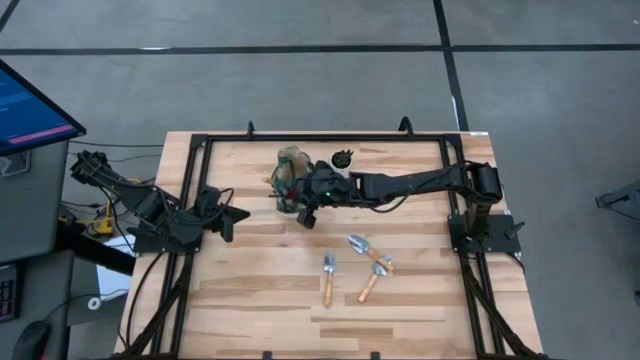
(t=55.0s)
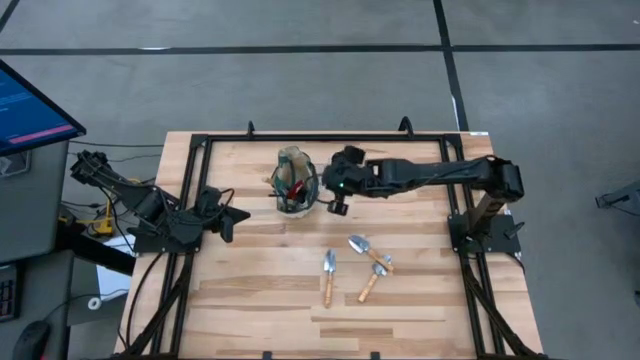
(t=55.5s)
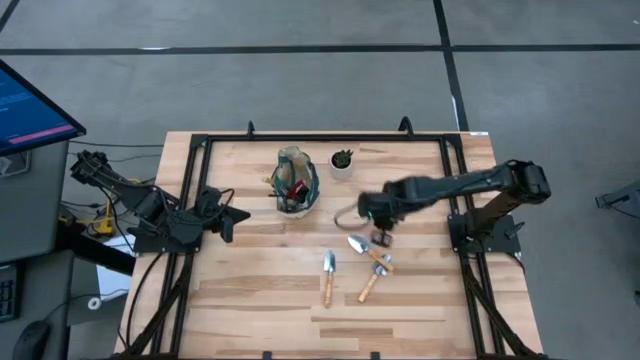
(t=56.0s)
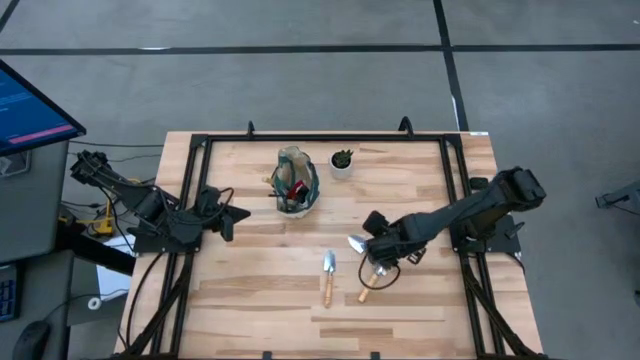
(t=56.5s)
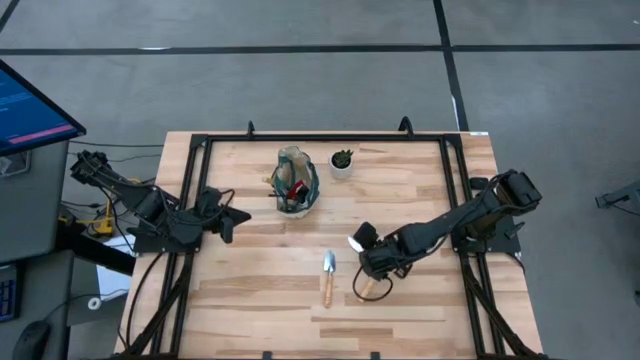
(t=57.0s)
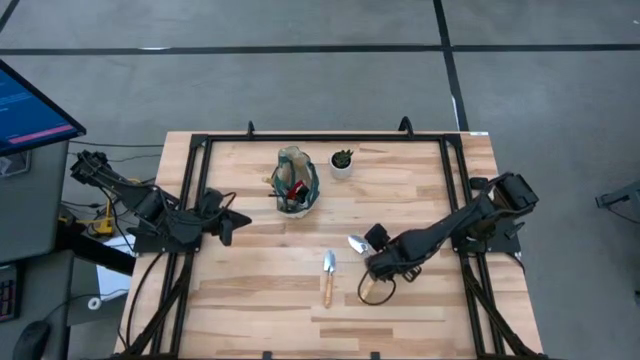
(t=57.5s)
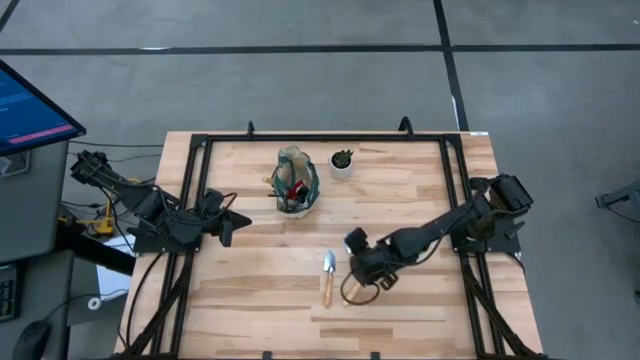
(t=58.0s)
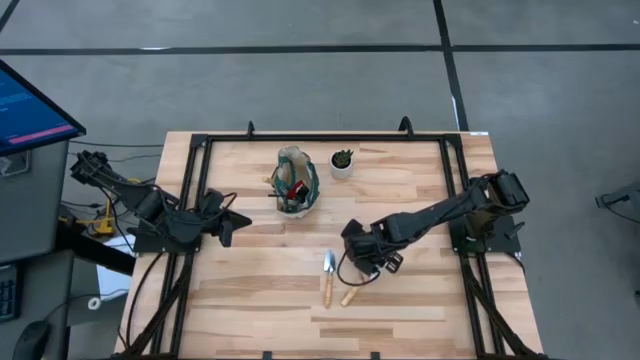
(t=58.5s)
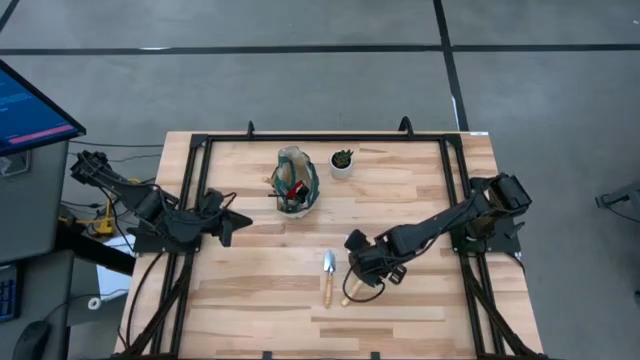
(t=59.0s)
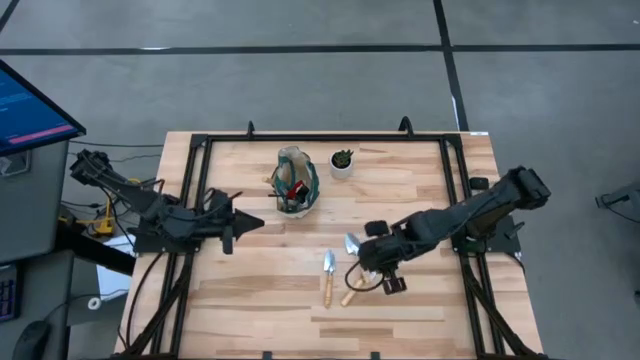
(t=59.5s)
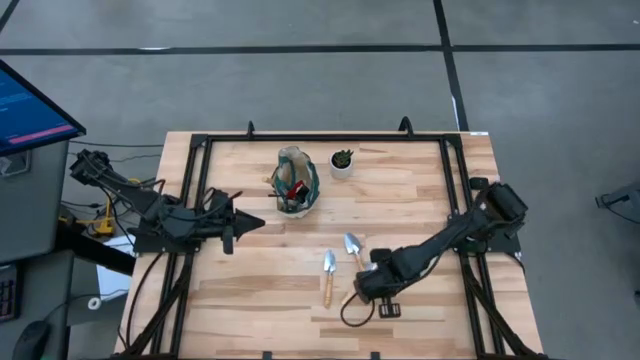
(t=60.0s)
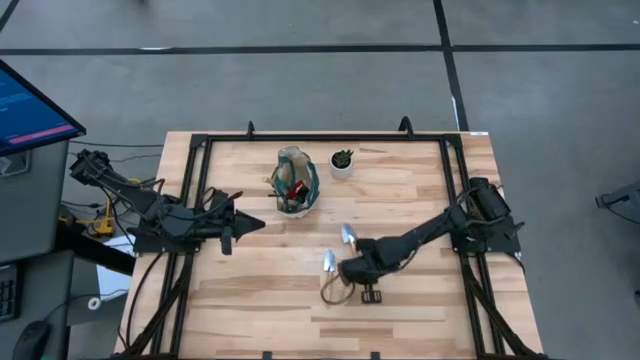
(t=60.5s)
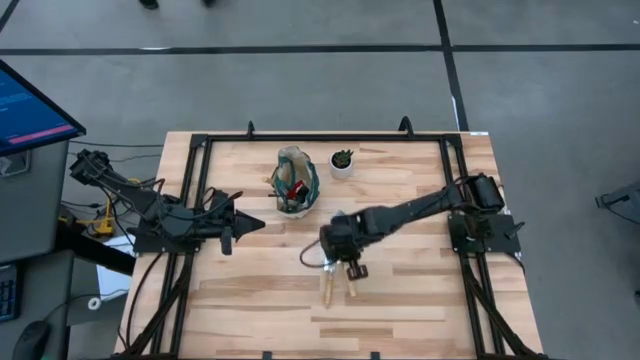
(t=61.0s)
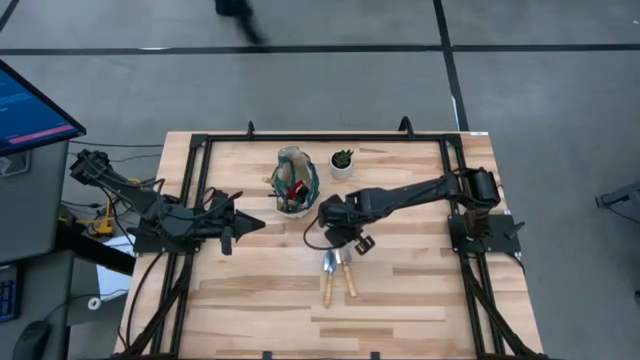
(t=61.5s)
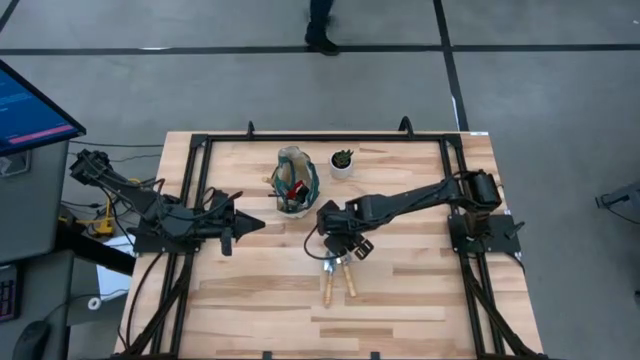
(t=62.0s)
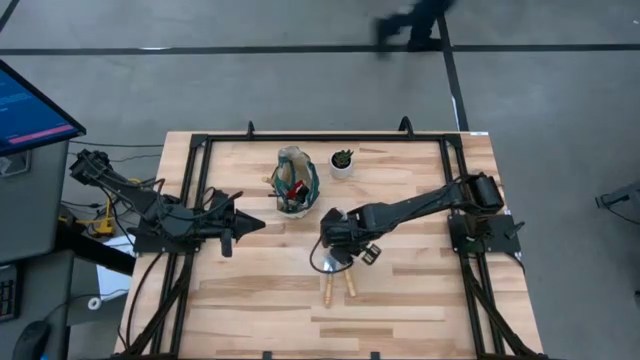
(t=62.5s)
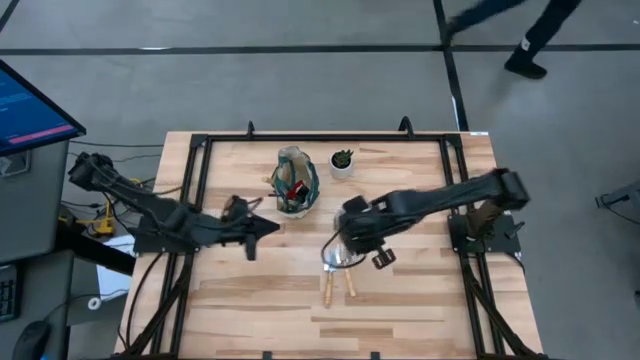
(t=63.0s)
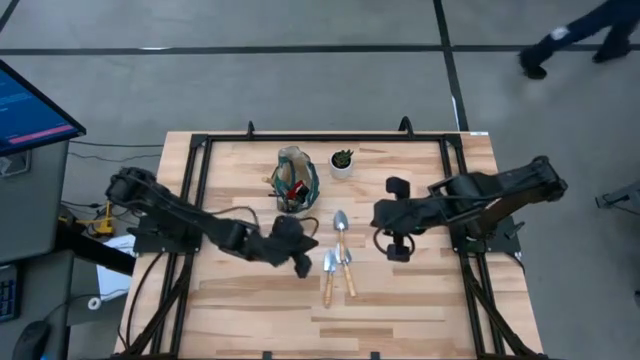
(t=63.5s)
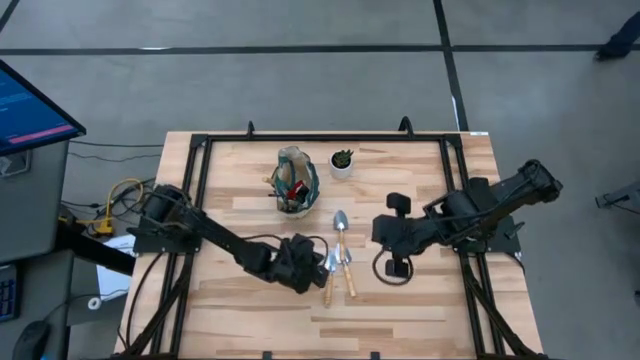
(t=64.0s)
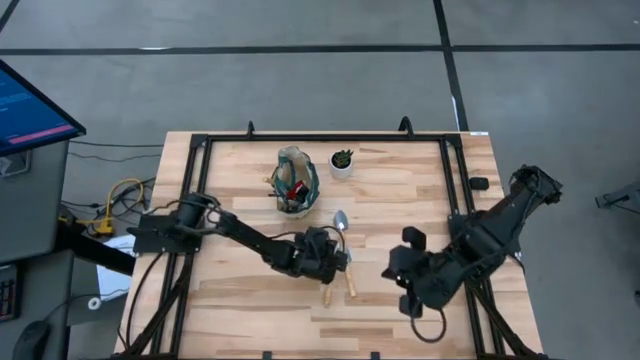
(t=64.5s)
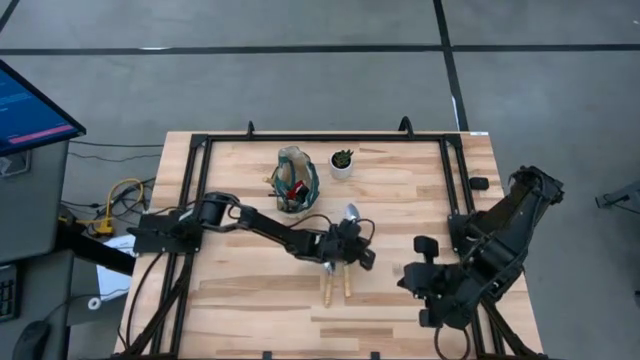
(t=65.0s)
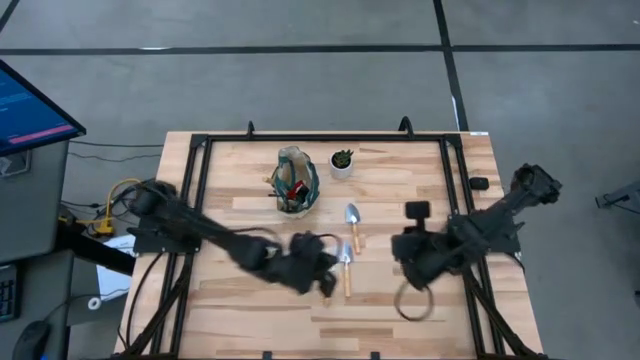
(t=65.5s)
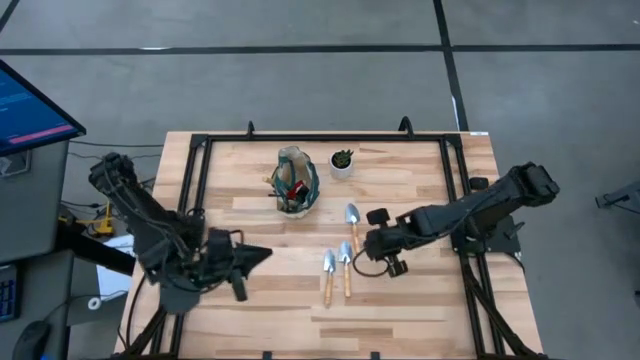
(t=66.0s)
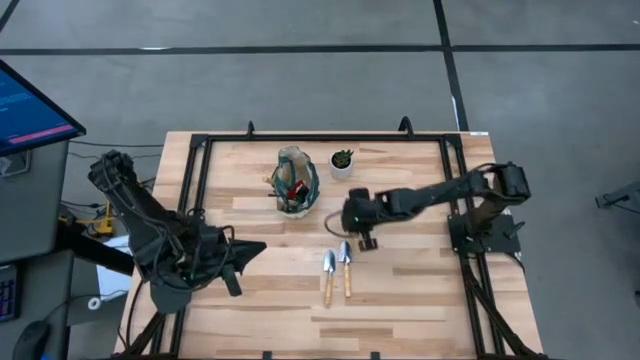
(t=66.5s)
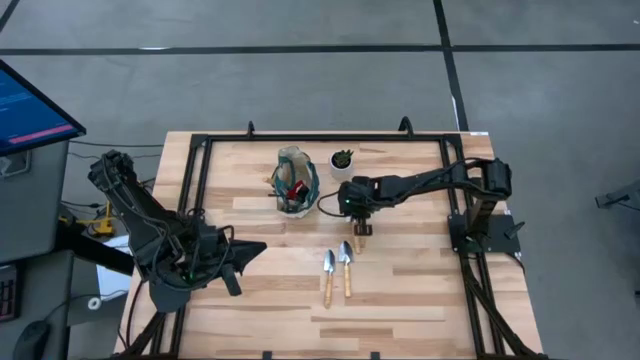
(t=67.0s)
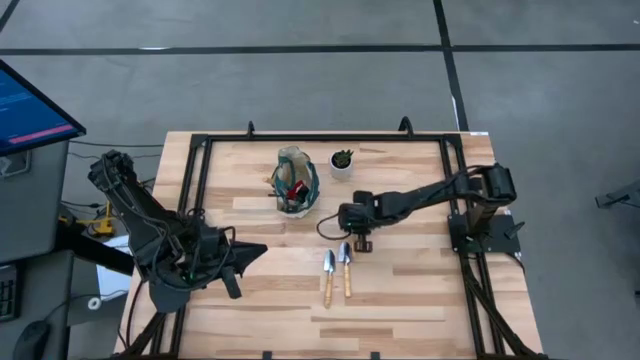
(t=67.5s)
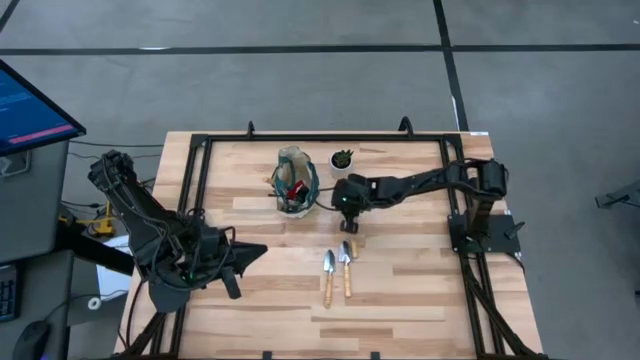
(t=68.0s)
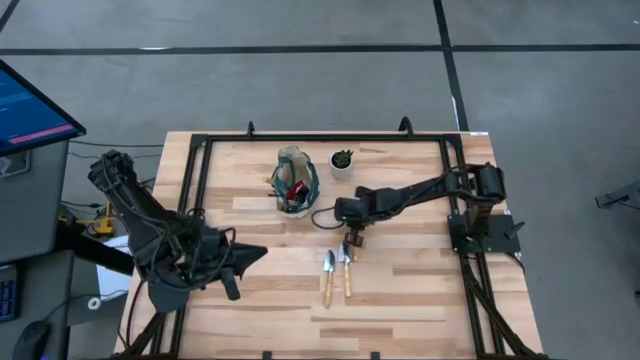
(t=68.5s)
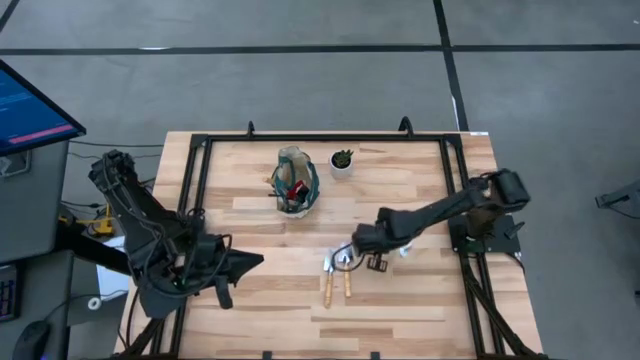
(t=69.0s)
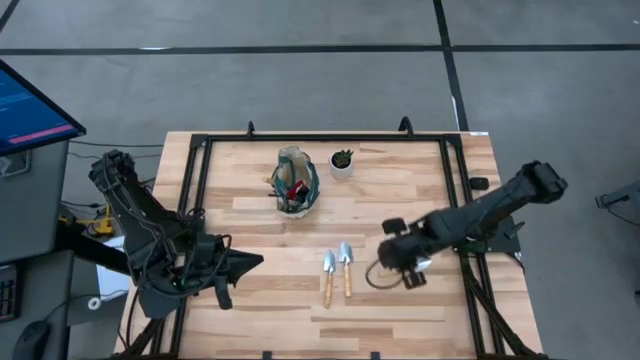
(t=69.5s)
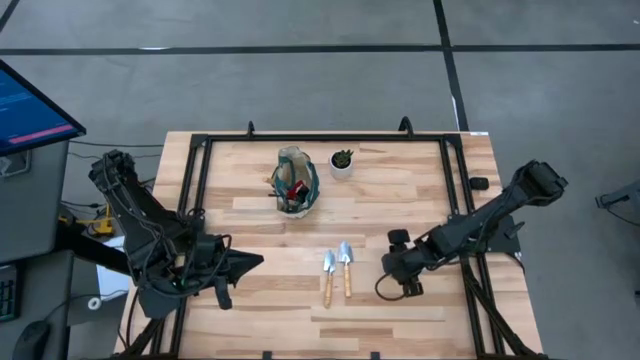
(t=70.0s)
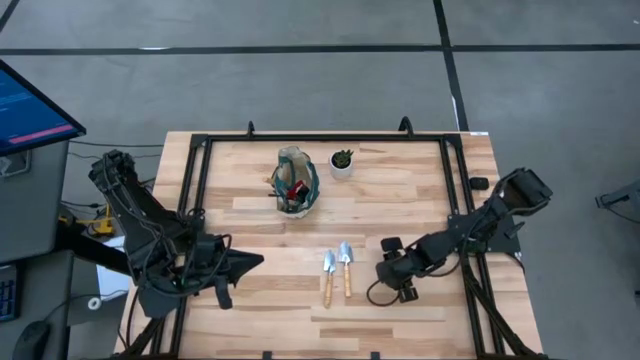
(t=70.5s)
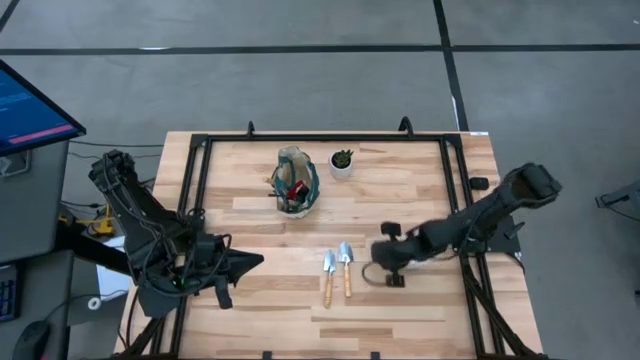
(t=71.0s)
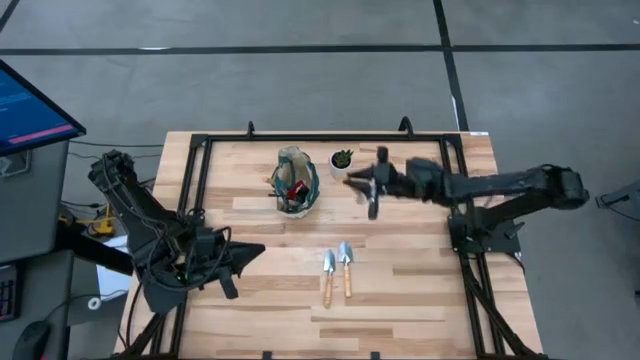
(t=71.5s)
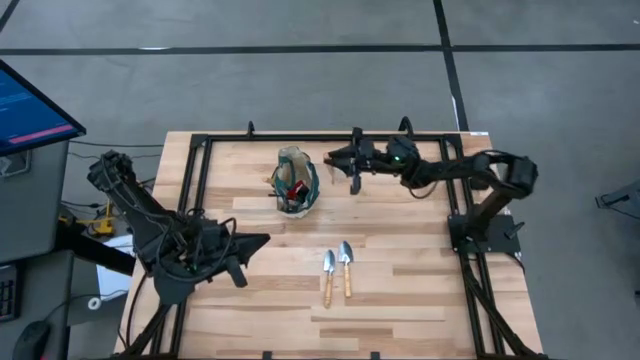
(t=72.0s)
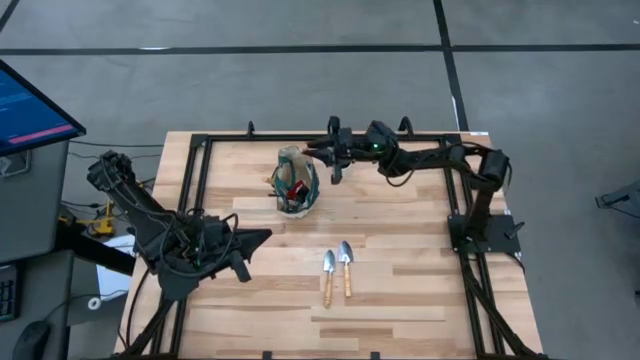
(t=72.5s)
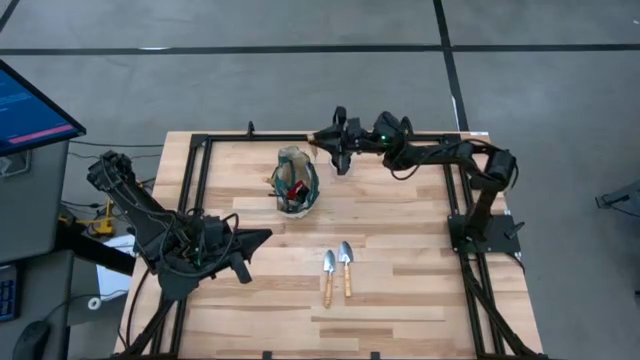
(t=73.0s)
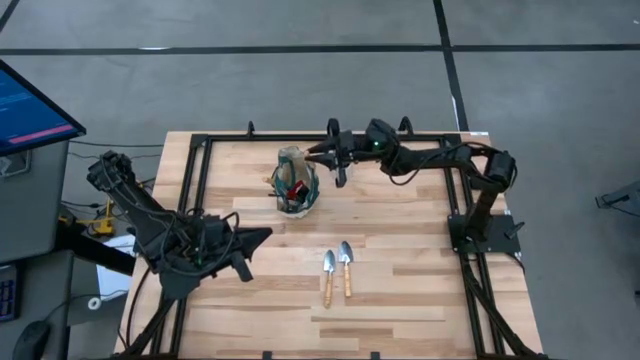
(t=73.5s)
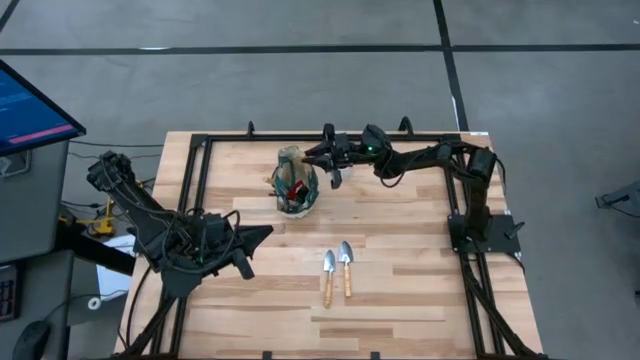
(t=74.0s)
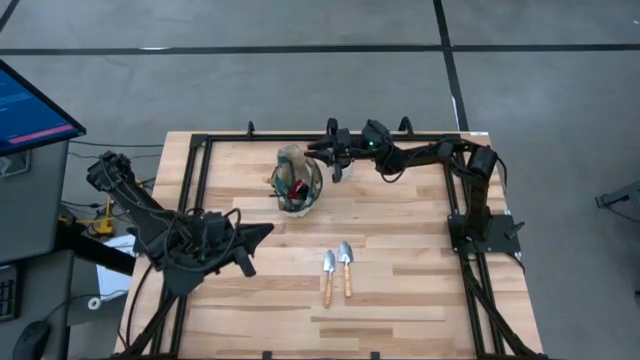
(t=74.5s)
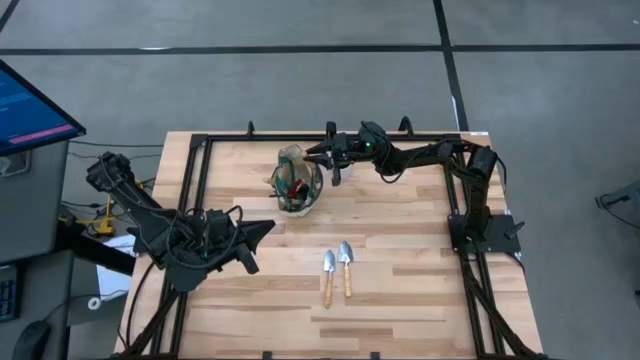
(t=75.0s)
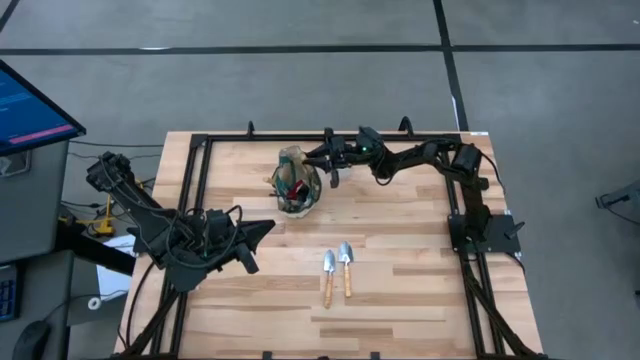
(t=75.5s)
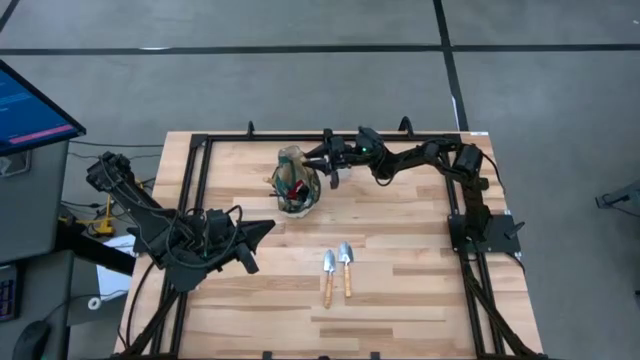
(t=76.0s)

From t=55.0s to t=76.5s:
Task: Pick & Place Garden tools in Gardening bag
Put the top light brown trowel into the pocket of the white gardening bag
